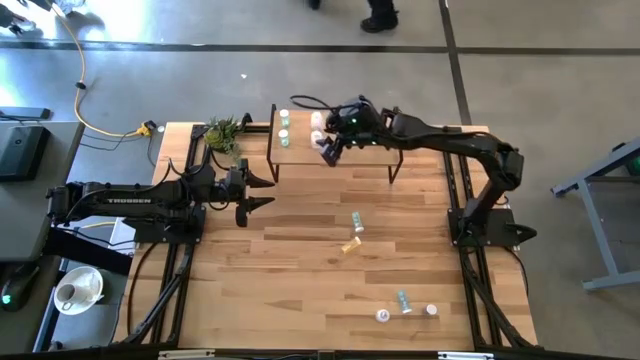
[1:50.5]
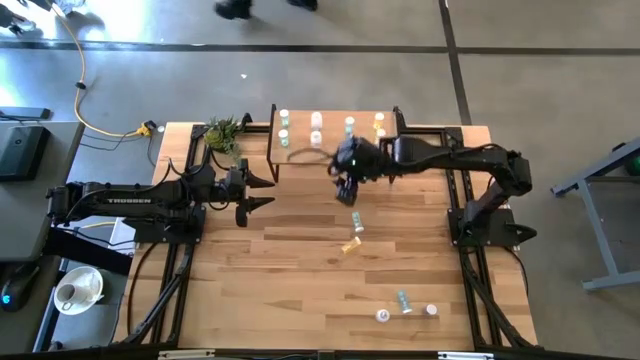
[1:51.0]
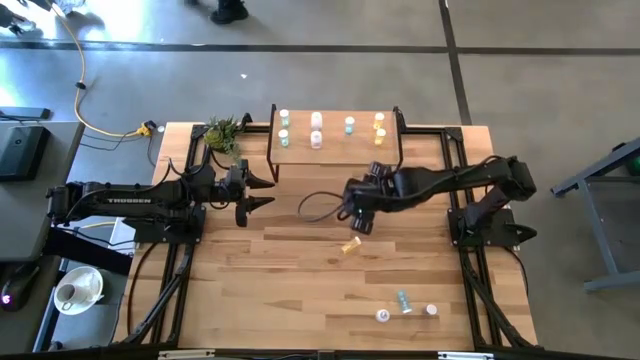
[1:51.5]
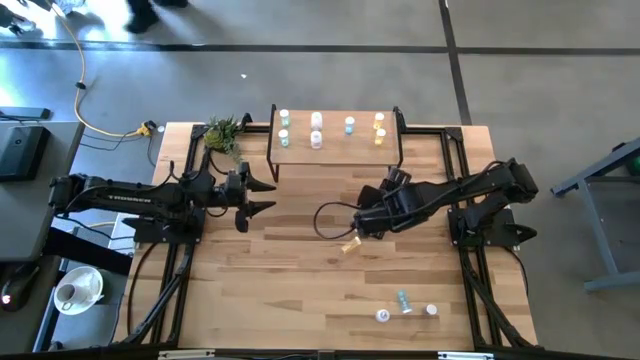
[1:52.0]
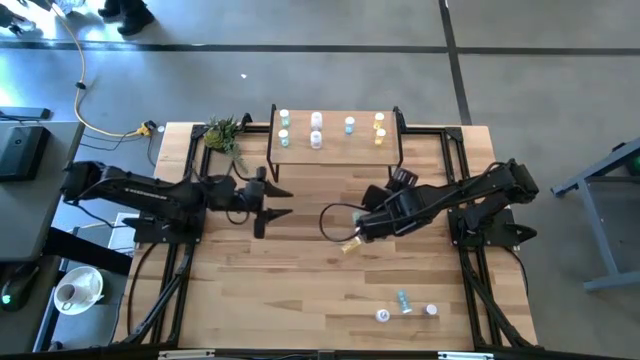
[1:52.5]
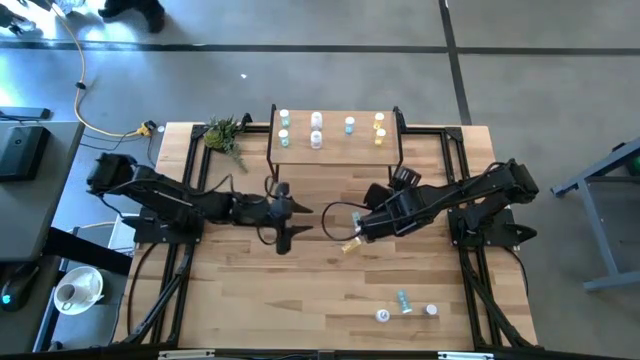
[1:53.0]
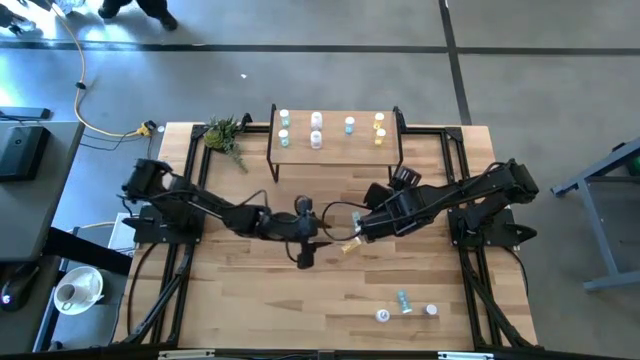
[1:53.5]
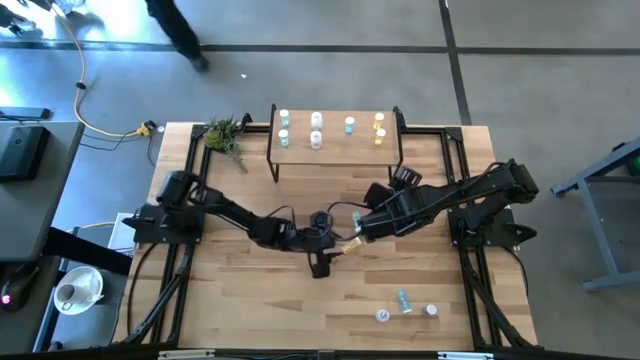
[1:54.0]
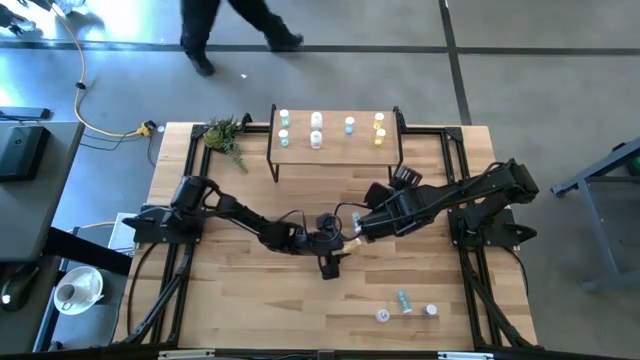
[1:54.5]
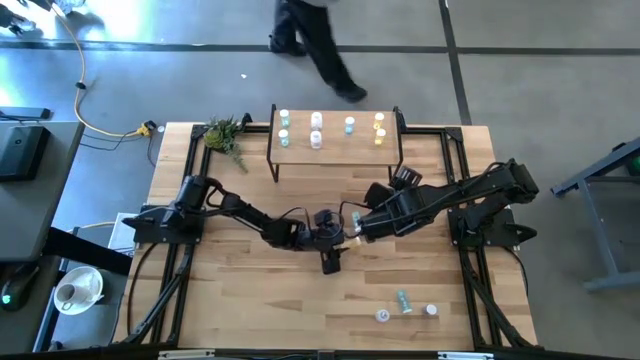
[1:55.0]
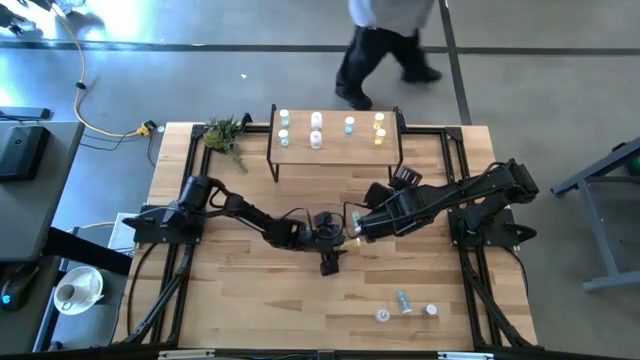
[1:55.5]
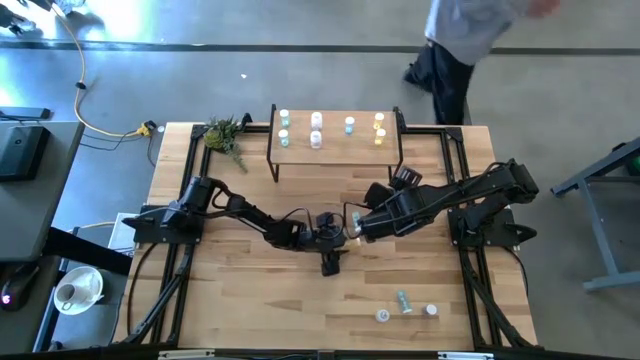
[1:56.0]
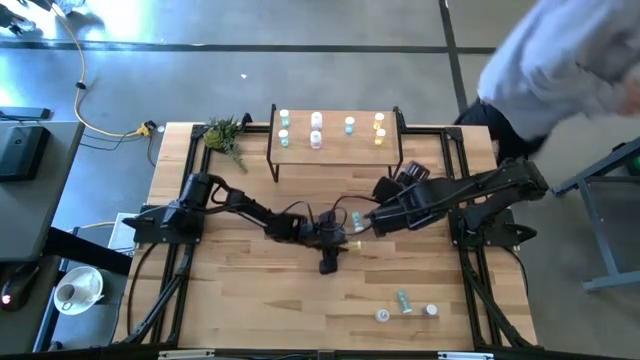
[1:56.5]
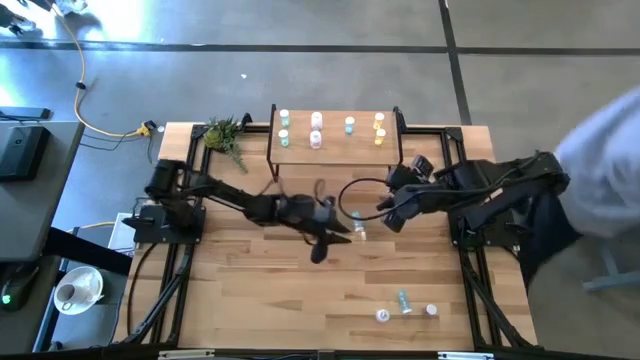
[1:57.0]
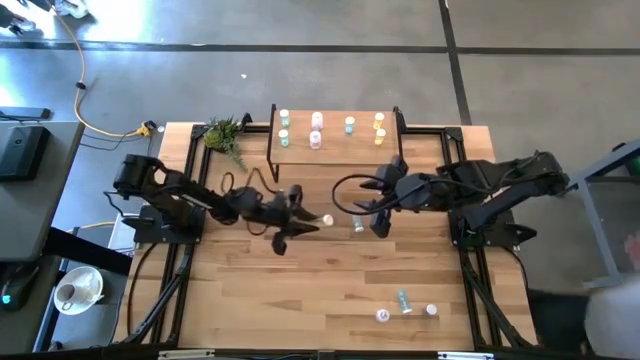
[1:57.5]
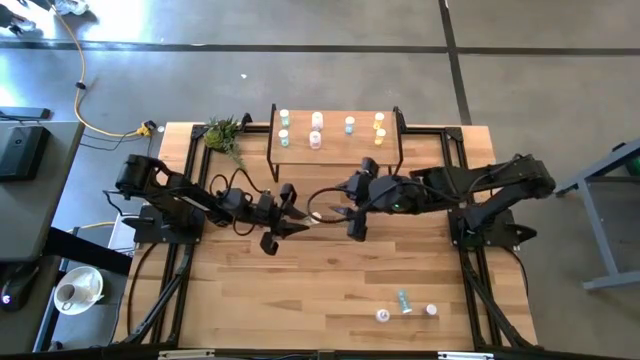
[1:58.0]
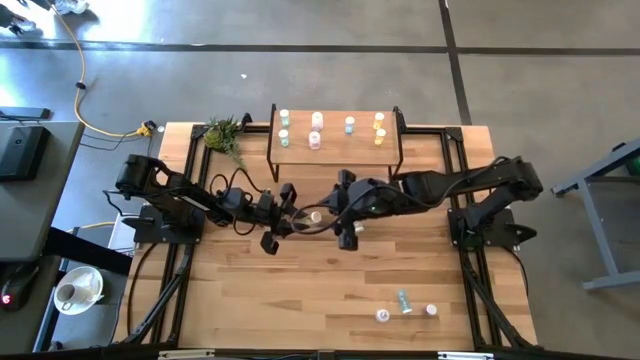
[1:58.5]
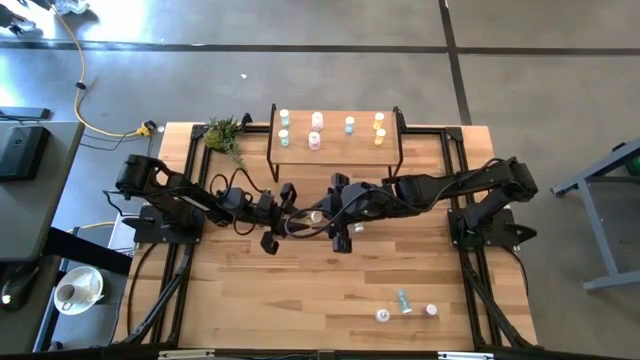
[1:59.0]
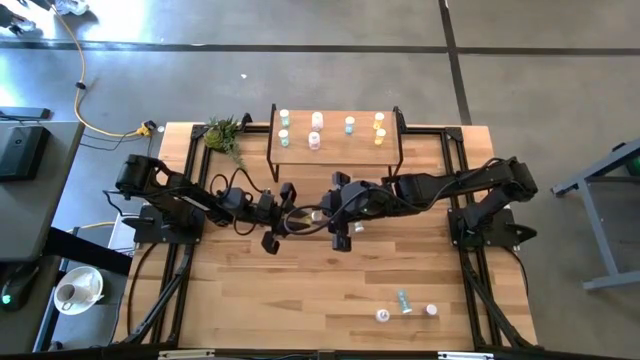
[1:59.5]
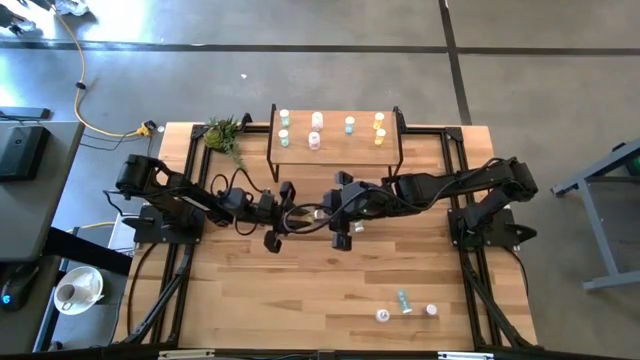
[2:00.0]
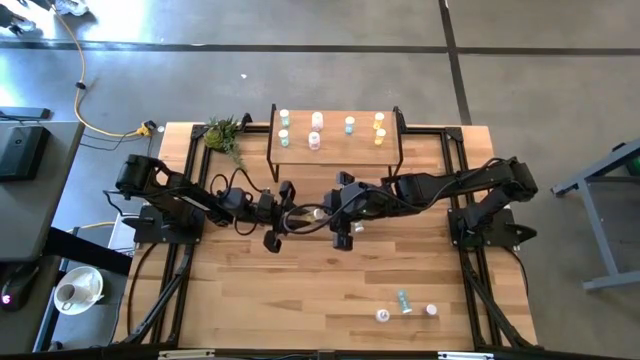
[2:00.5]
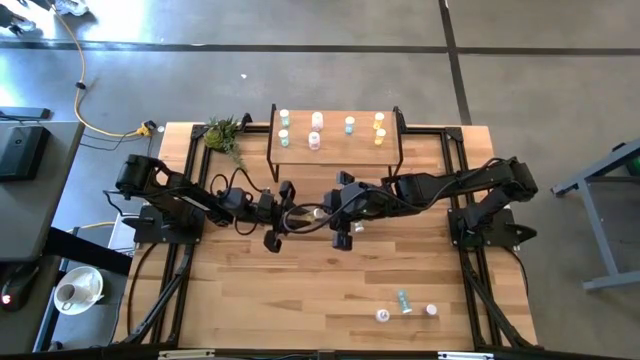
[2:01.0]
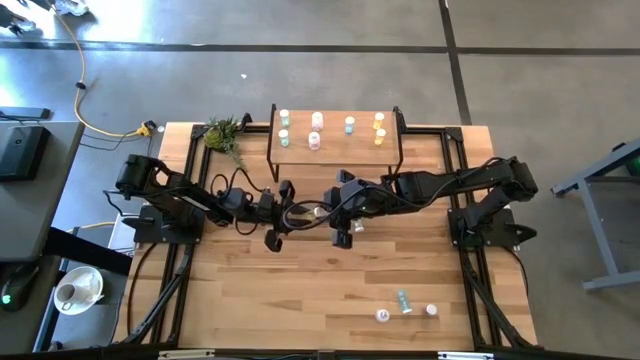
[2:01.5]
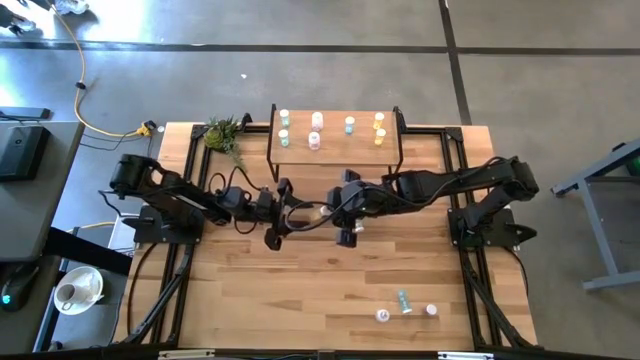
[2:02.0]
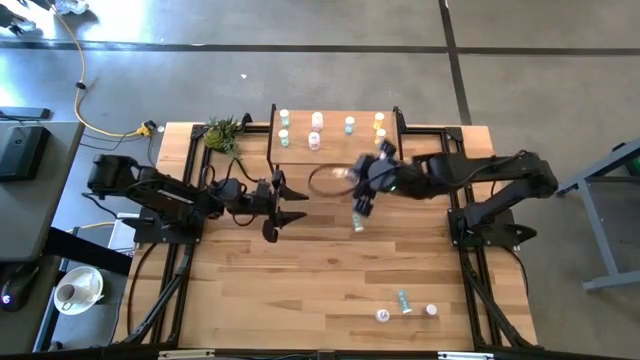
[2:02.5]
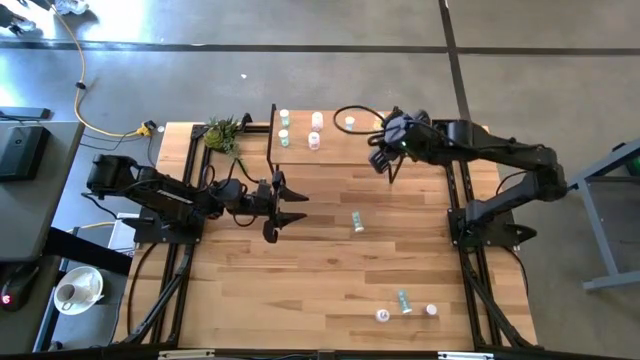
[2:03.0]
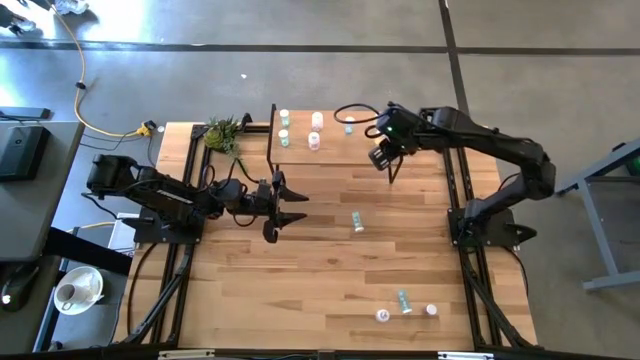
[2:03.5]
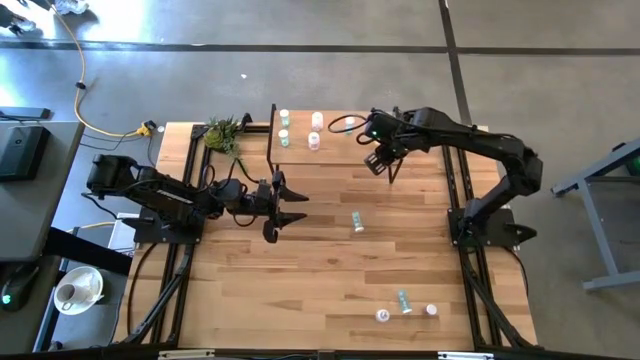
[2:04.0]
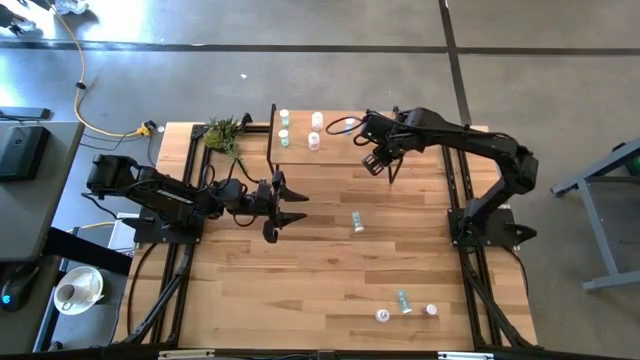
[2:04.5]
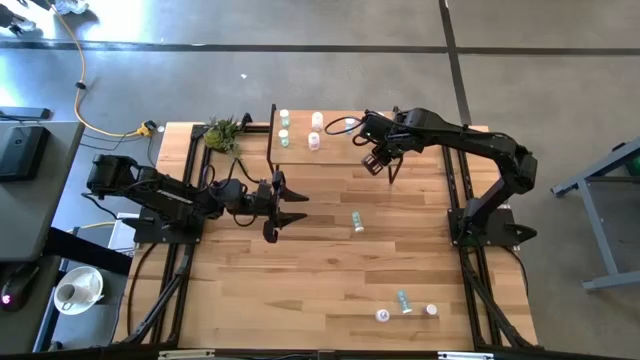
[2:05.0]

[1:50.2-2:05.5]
Task: Pick and place medicine bottles onto shelf by color
Put the yellow pill bottle on the shelf aligned with the other yellow pill bottle

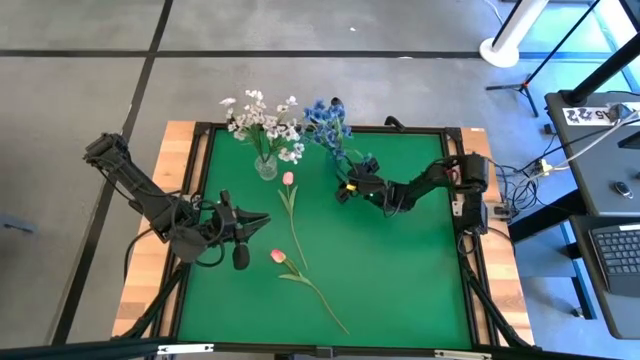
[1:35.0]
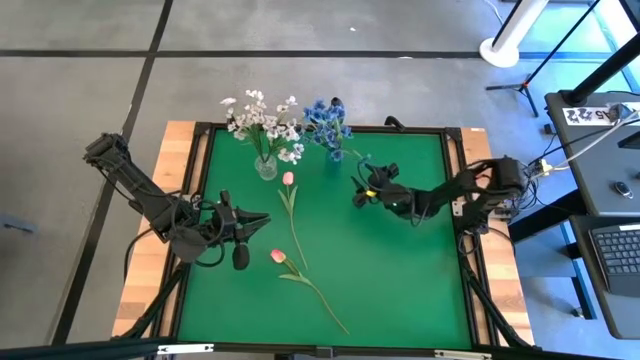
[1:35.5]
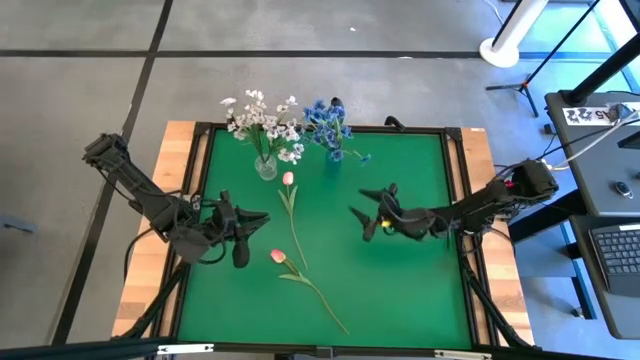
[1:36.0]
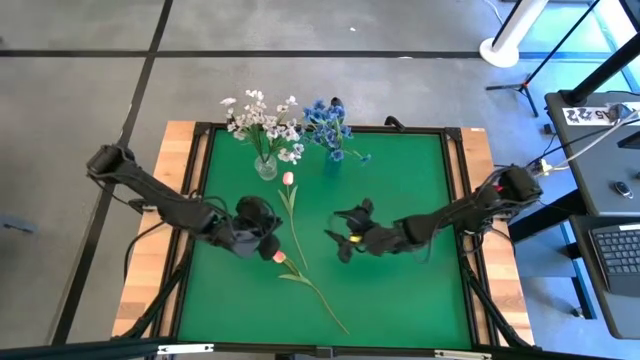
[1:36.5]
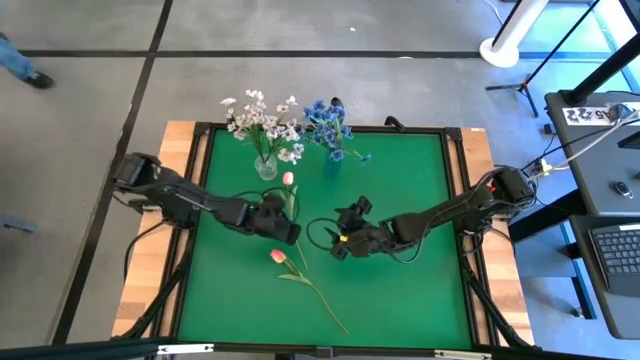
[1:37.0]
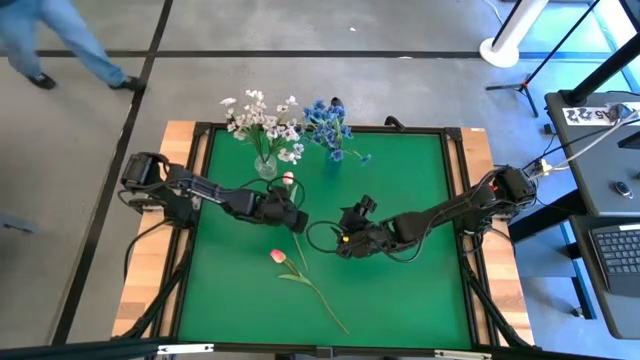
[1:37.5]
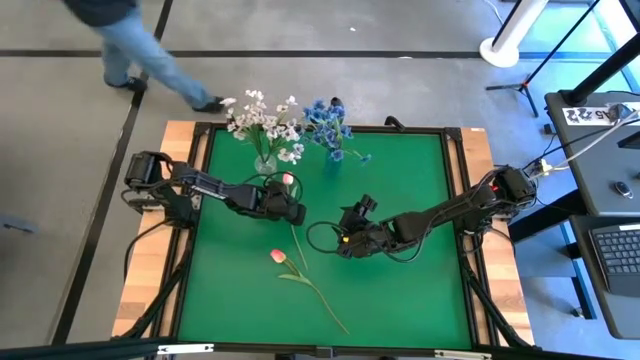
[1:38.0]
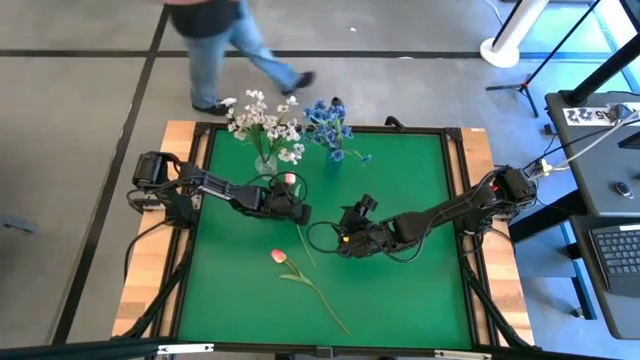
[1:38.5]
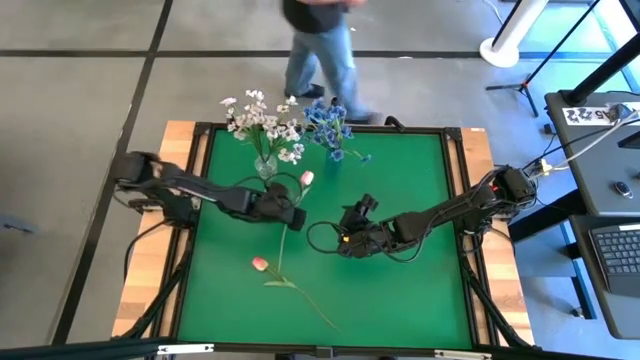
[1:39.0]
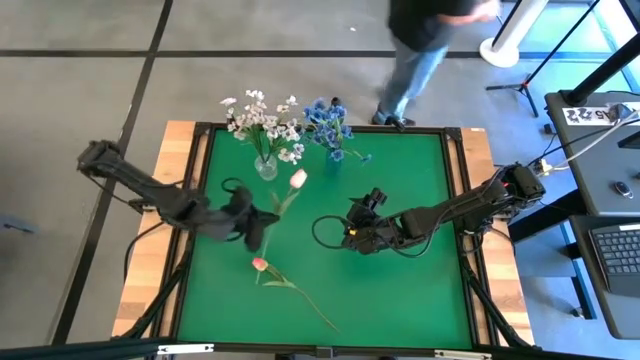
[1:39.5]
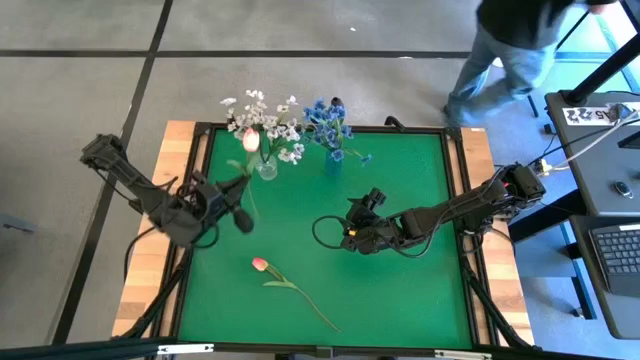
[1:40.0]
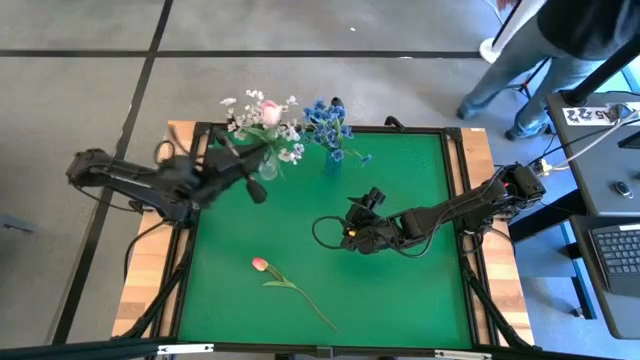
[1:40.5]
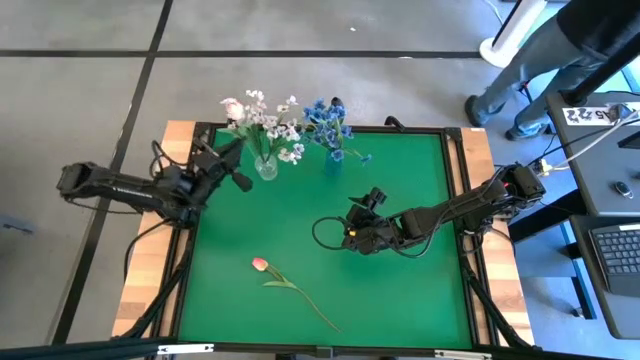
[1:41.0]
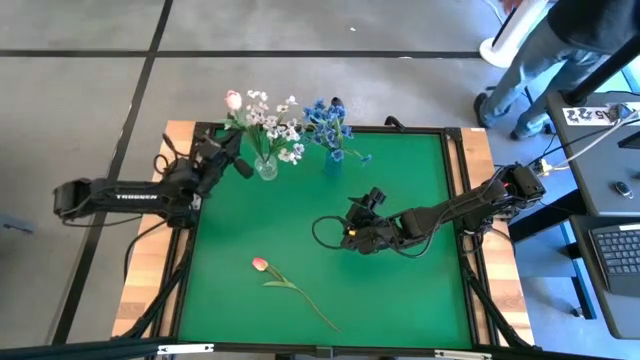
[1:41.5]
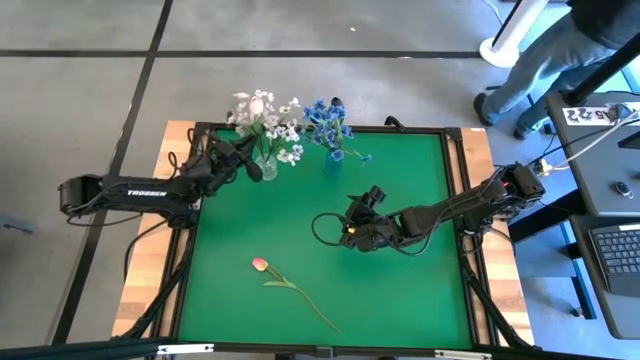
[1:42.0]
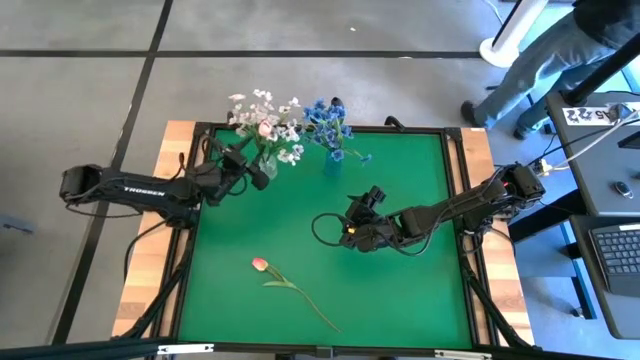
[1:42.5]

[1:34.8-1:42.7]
Task: Sort flowers into vase by color
Put the top pink flower into the transparent vase
